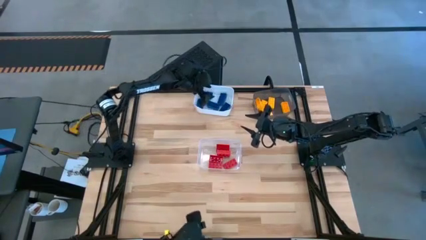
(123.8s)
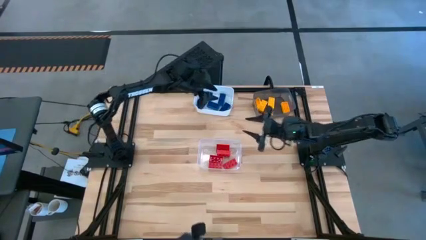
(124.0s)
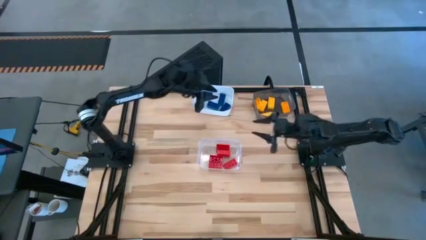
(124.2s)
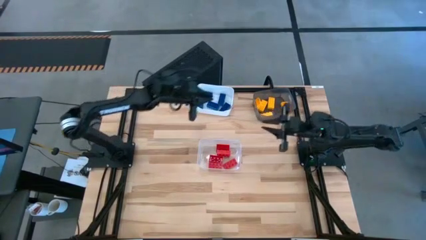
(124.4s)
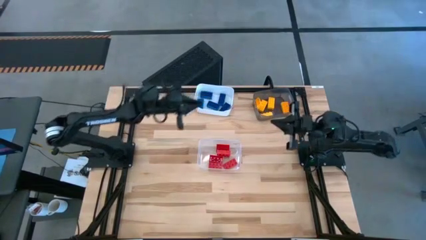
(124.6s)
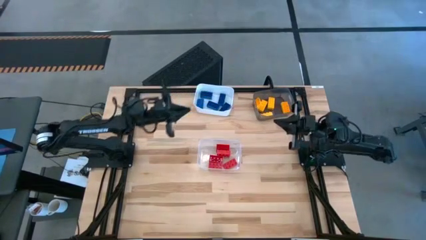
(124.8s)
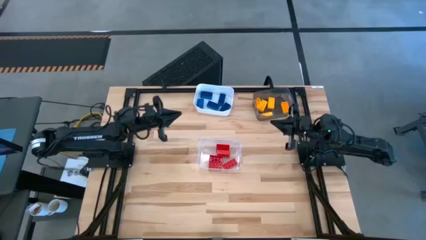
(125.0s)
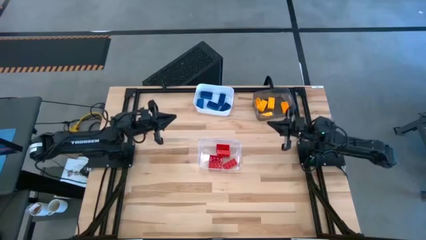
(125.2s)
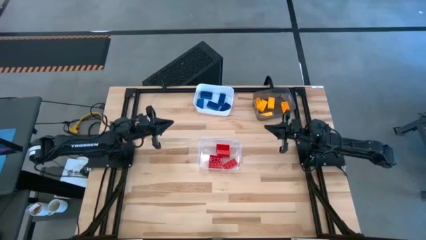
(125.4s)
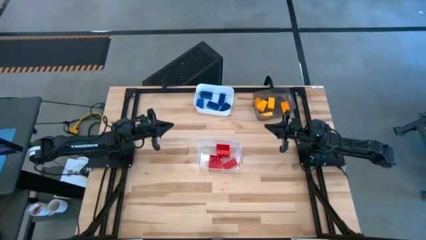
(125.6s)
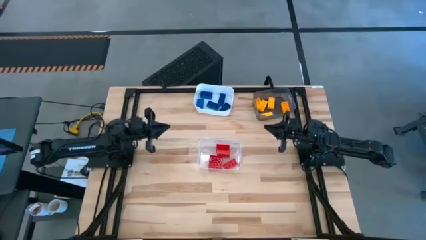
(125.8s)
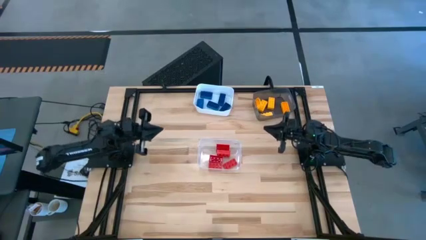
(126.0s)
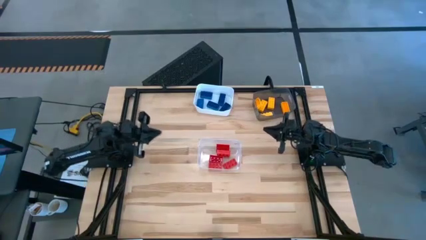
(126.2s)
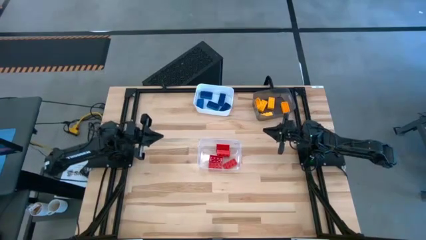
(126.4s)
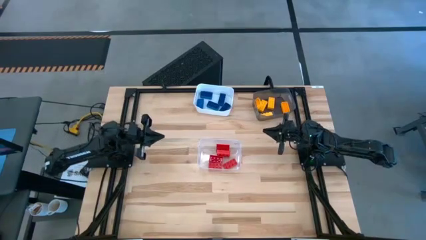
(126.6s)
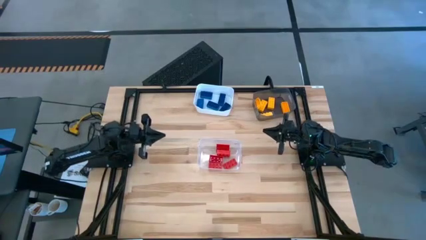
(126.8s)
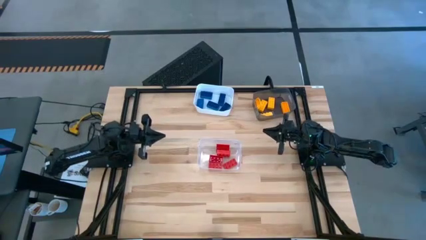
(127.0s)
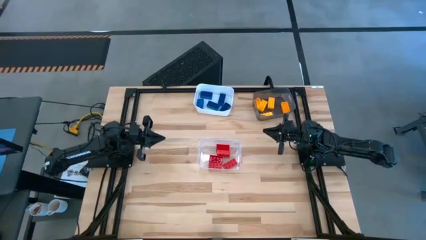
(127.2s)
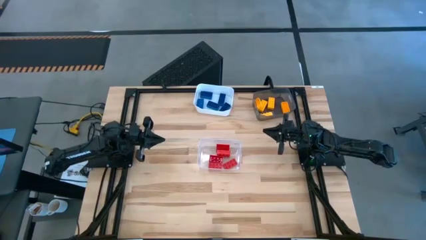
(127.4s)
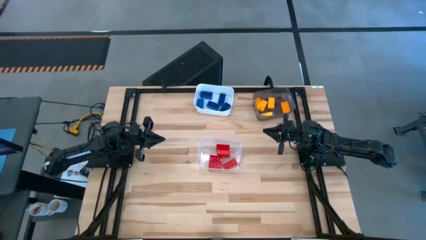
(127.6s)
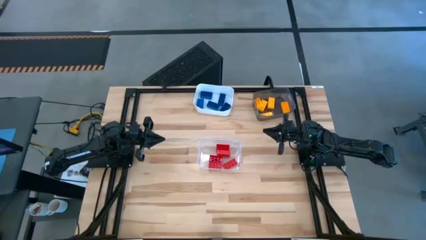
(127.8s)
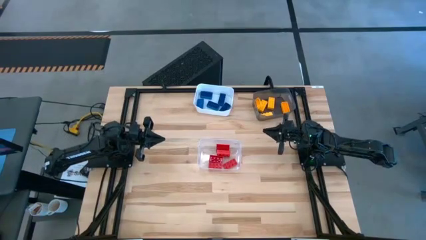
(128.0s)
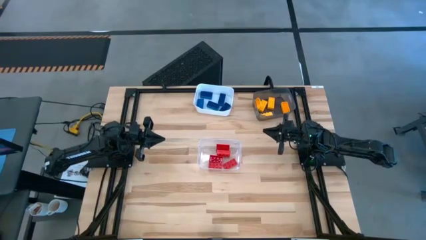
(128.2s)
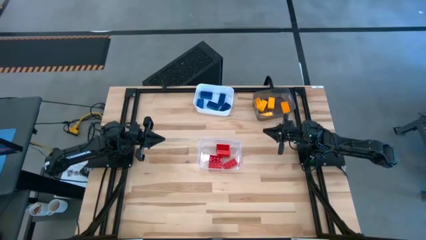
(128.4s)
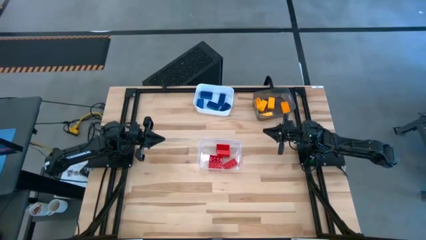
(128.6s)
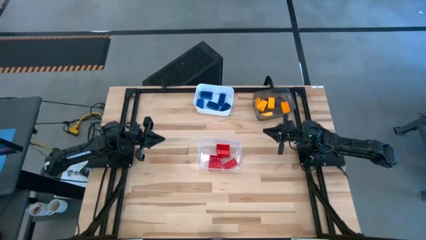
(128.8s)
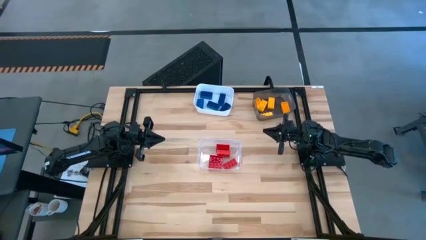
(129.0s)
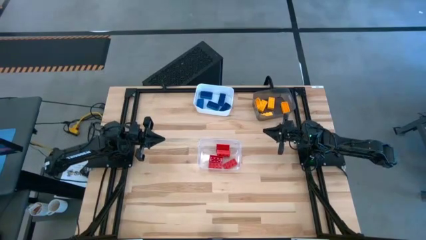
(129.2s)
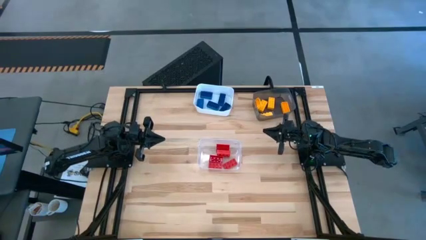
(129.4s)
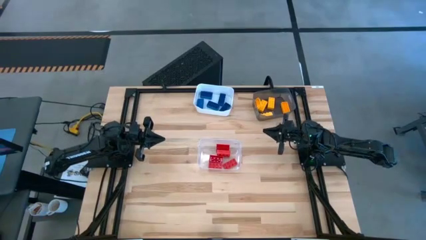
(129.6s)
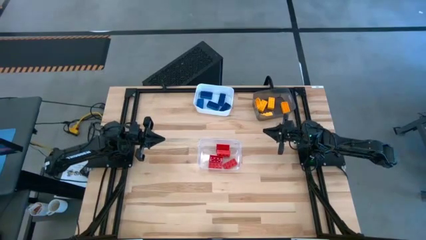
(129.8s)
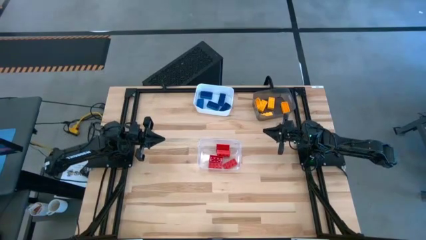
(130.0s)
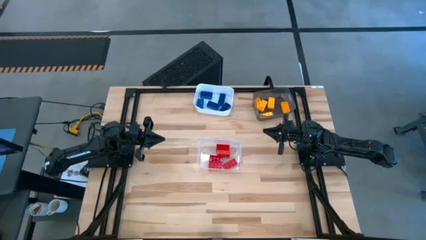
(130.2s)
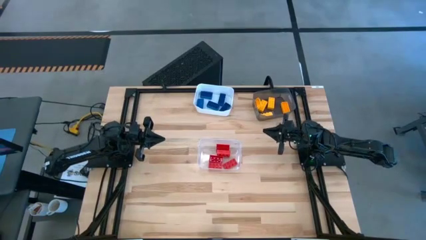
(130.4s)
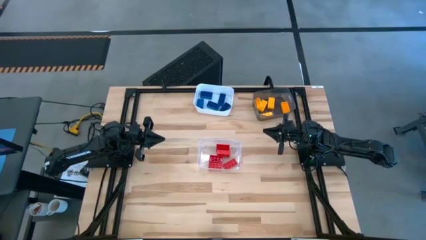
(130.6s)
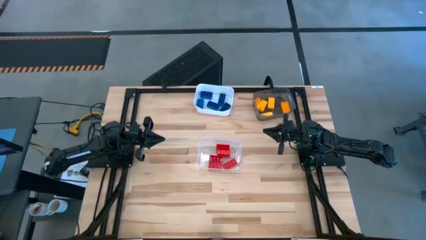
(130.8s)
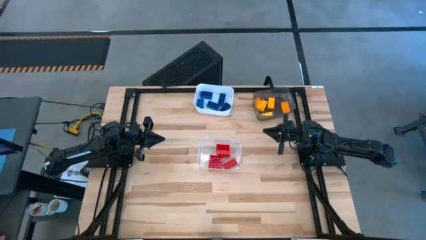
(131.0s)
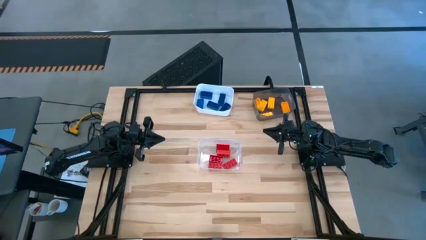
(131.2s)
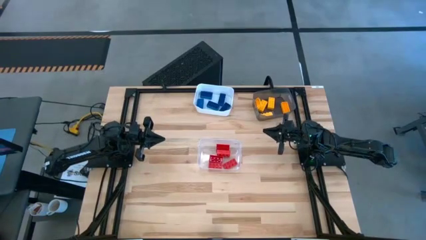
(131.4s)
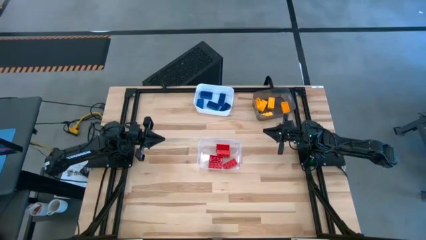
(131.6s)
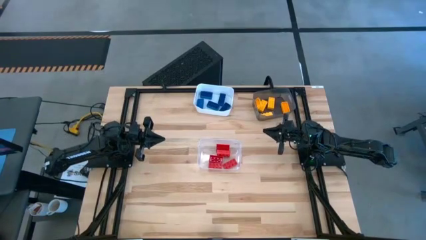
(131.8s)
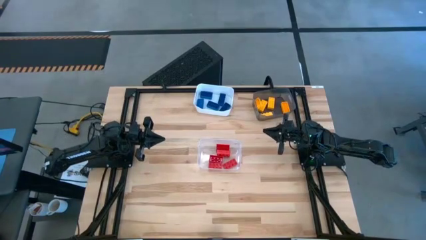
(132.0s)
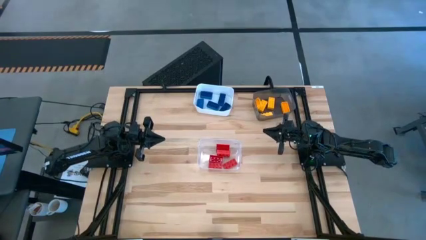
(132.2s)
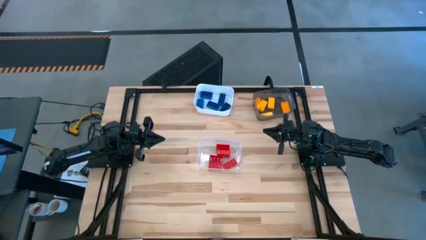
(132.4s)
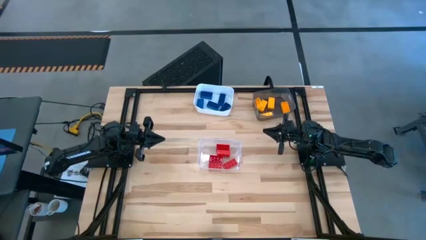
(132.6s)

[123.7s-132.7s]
Task: Sort & place blocks by color
Return to Home Position

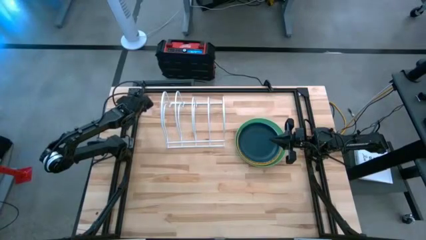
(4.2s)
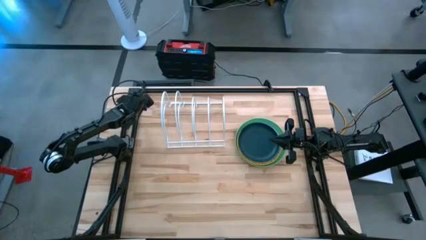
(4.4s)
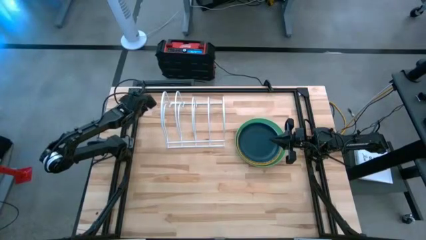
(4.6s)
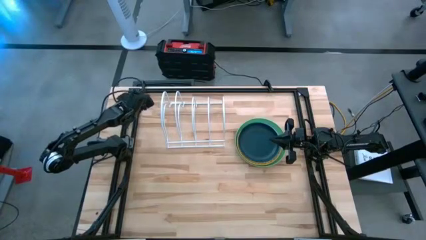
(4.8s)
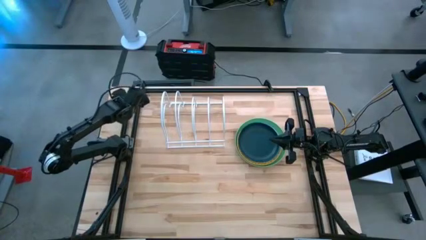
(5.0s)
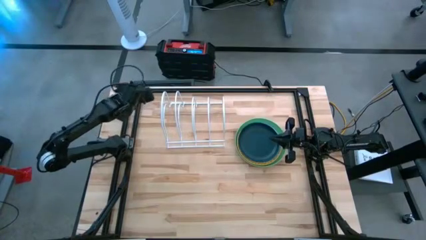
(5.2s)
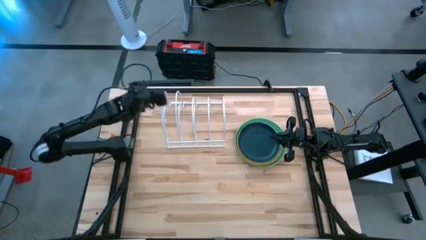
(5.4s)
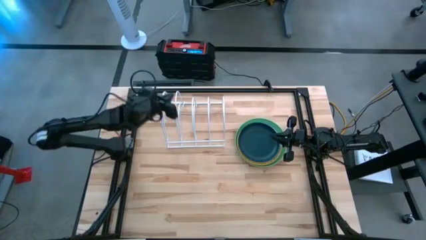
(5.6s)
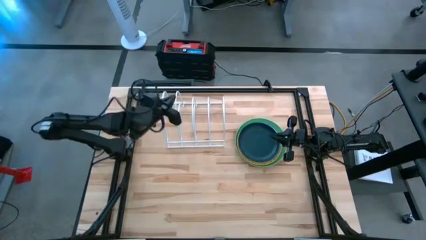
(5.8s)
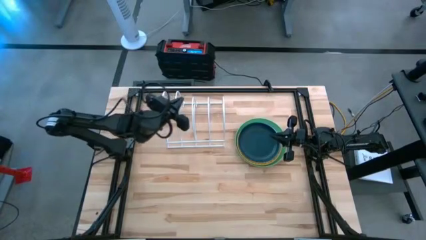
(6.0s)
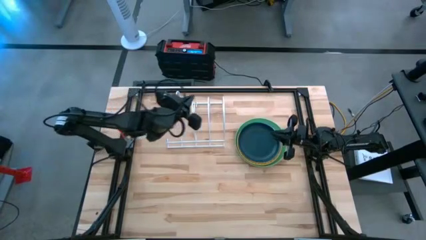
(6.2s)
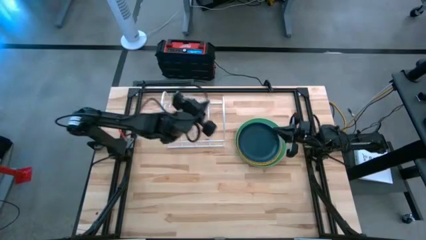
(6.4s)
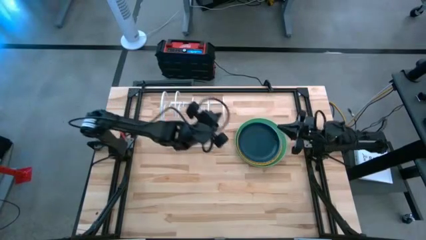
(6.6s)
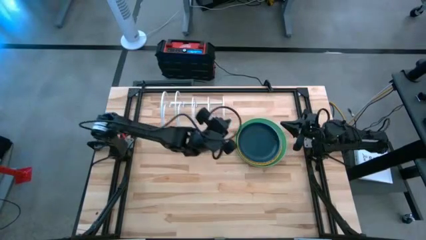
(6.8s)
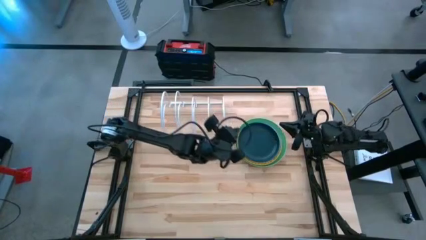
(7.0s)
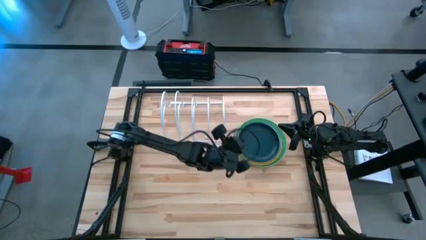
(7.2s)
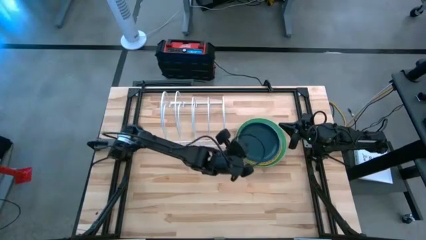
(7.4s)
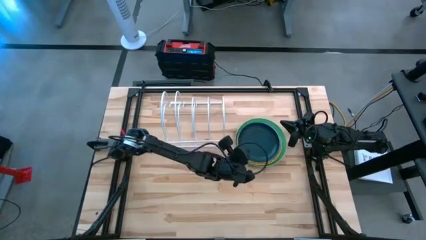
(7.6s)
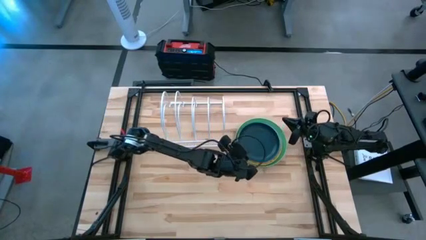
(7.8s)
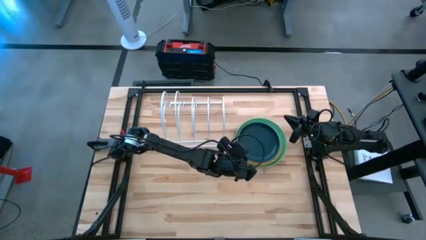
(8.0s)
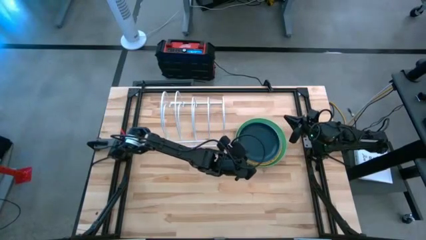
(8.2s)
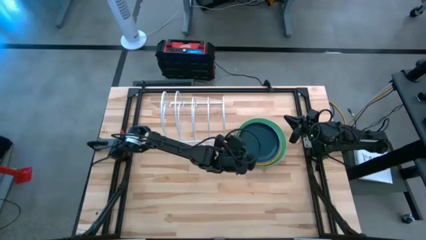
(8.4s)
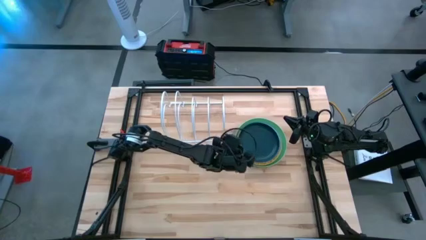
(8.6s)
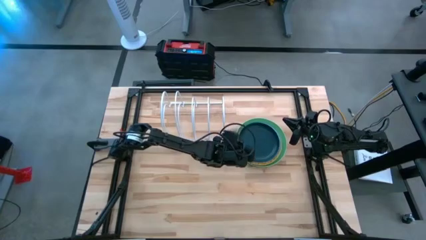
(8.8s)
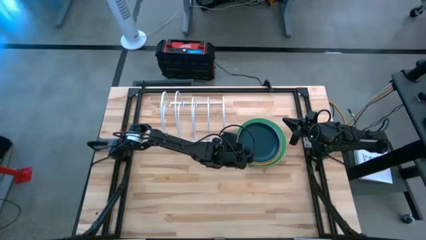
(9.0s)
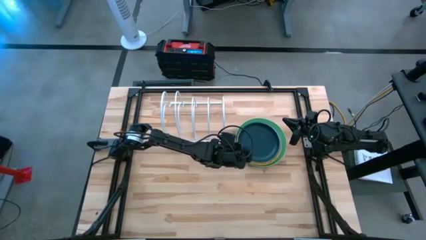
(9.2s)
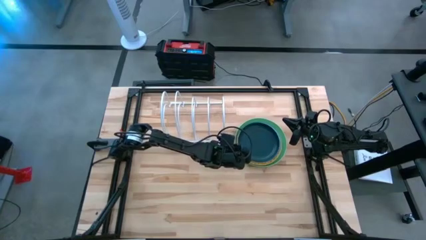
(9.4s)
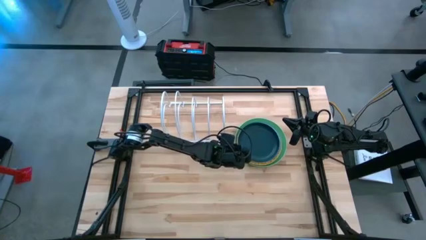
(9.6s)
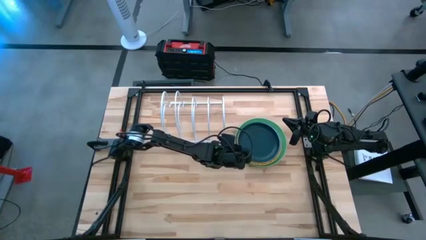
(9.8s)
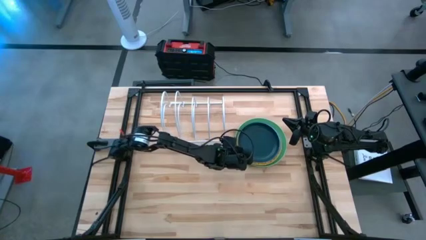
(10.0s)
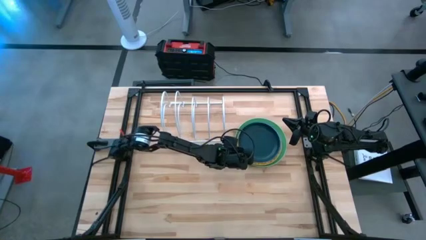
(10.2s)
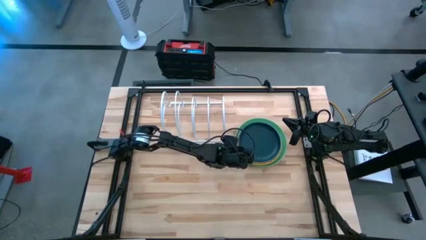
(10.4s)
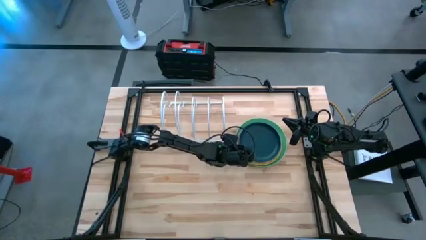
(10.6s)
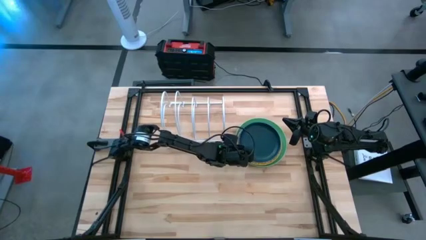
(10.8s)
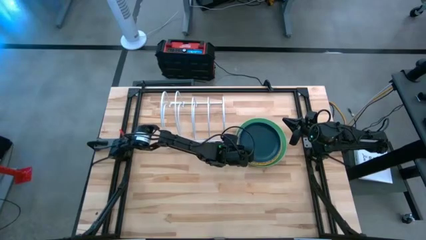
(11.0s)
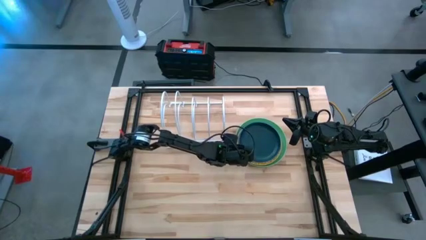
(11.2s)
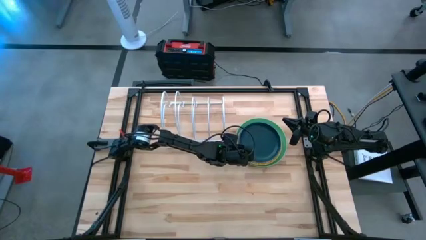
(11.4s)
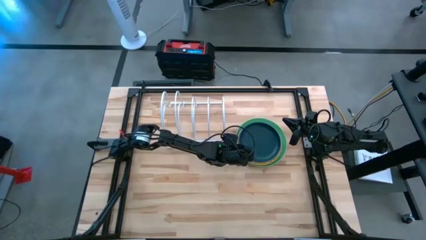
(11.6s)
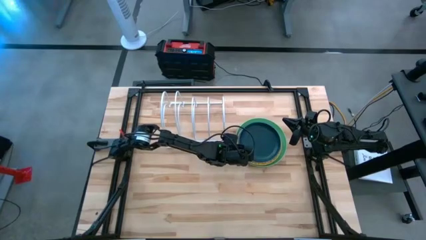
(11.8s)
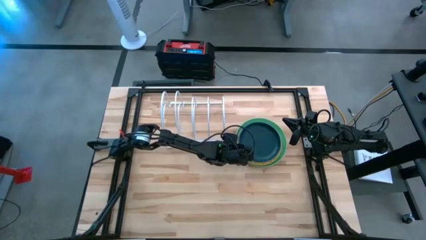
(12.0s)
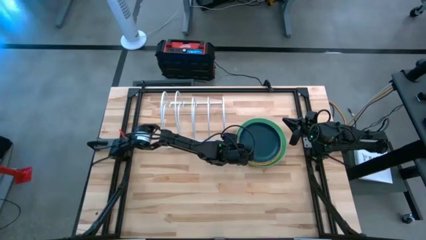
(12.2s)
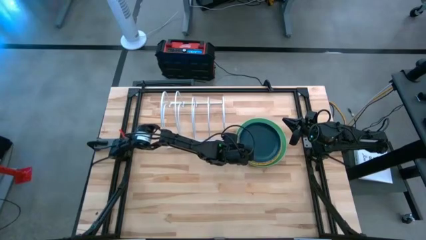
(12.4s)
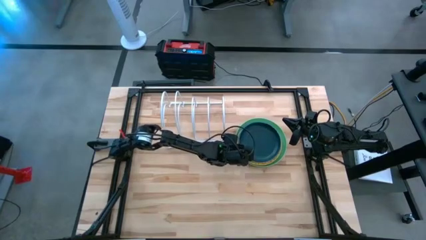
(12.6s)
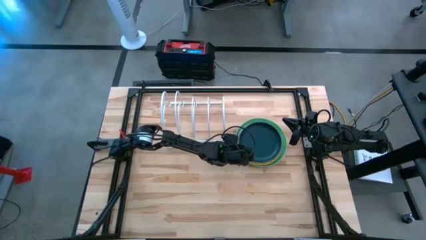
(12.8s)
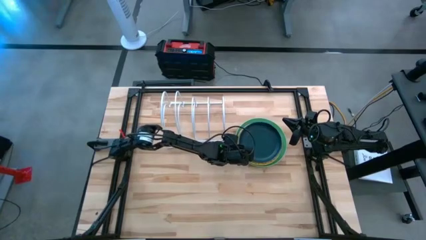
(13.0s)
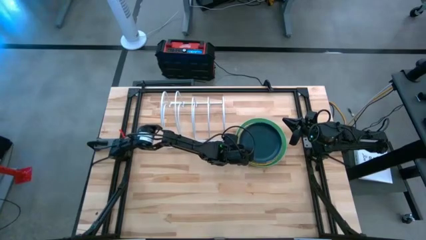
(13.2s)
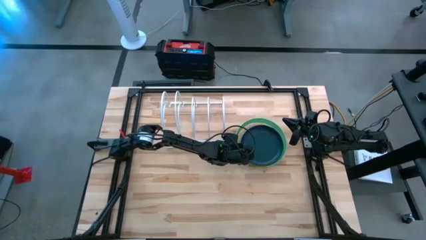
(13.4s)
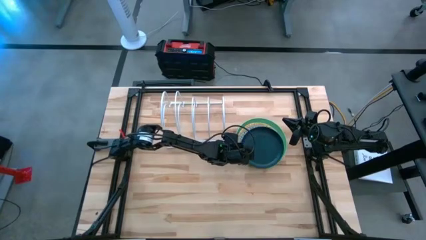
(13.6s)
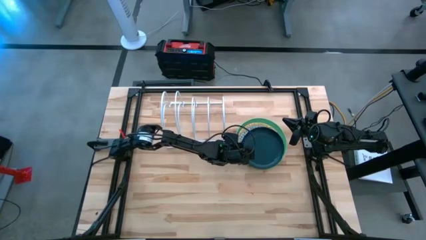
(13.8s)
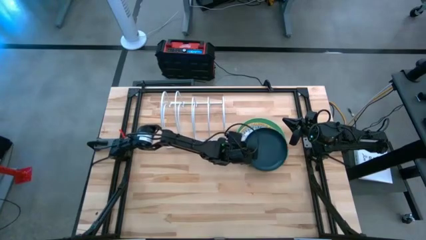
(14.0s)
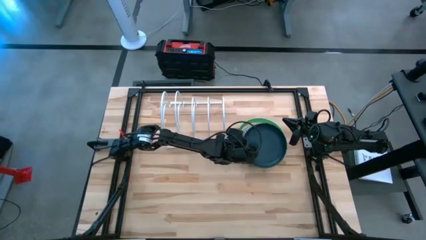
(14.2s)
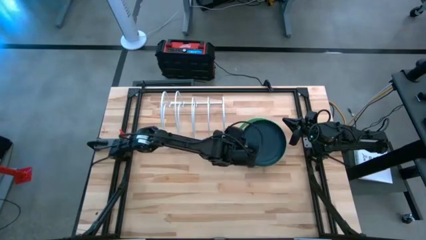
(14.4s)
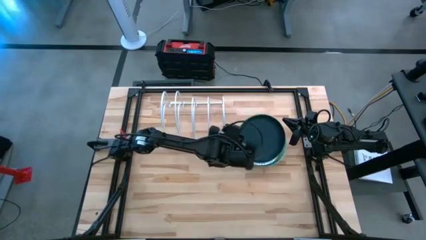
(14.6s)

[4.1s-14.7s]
Task: Sort dishes
Put the dark blue plate in the dish rack
